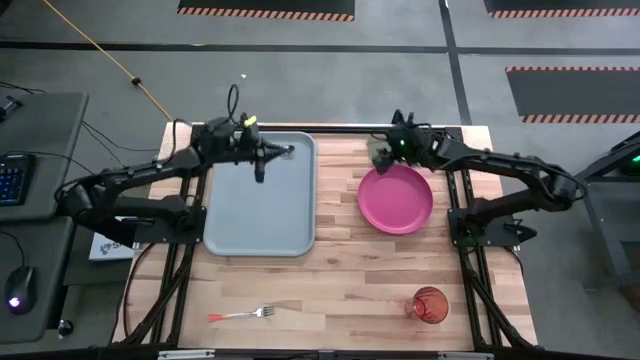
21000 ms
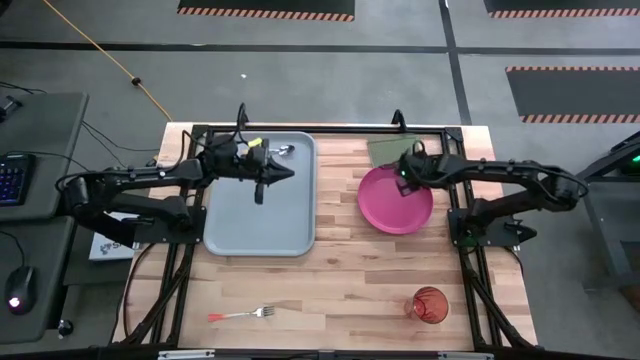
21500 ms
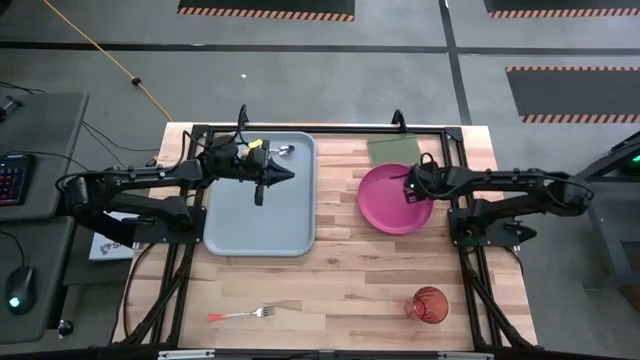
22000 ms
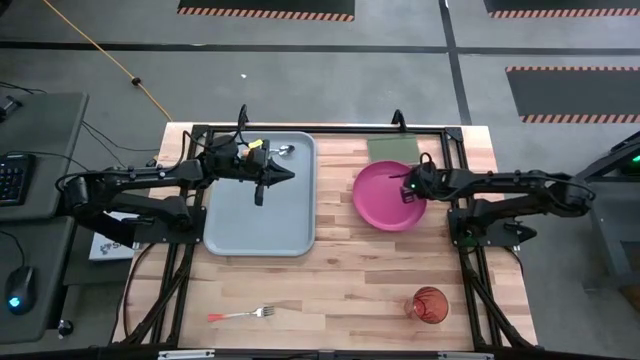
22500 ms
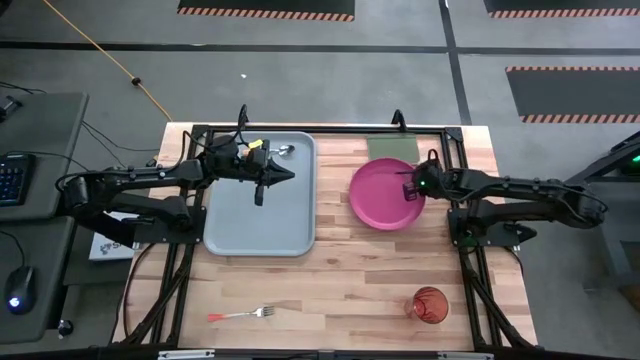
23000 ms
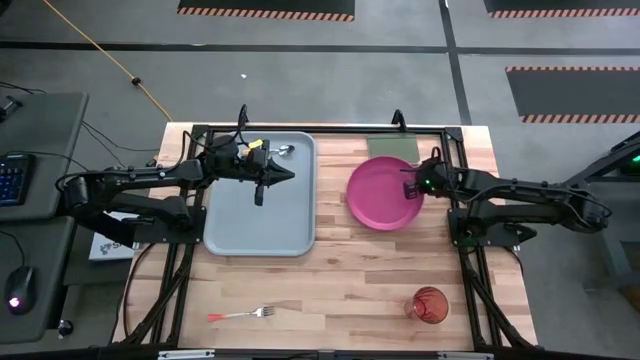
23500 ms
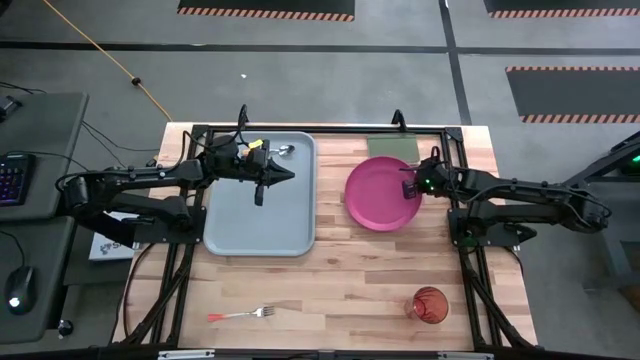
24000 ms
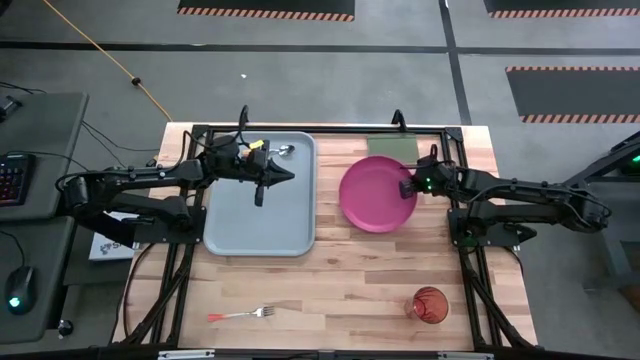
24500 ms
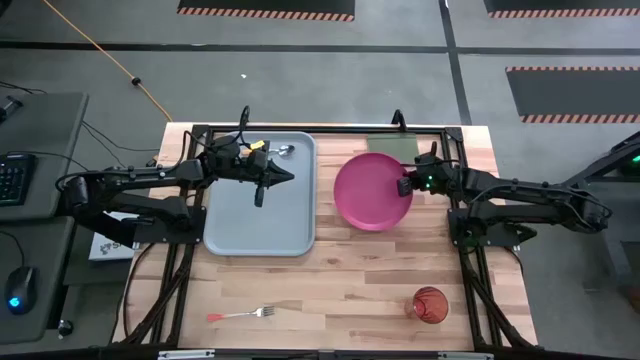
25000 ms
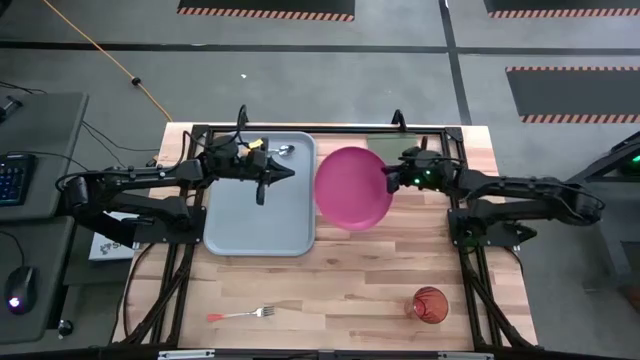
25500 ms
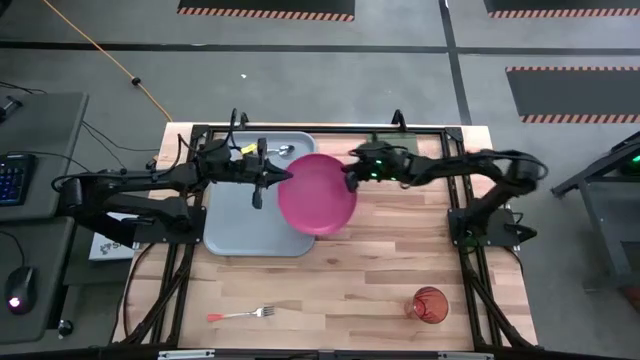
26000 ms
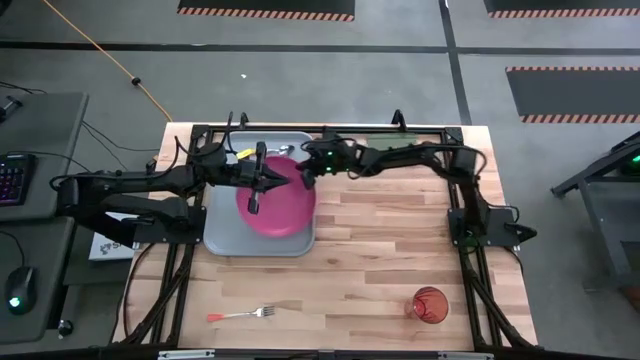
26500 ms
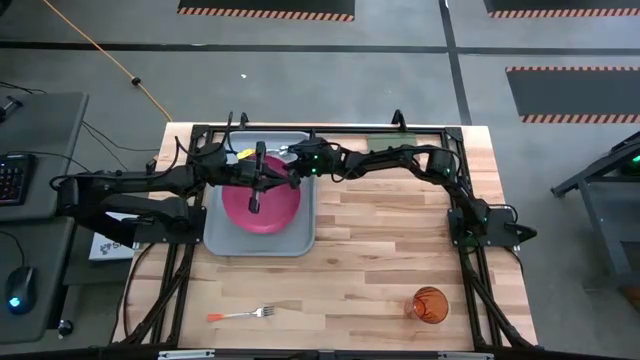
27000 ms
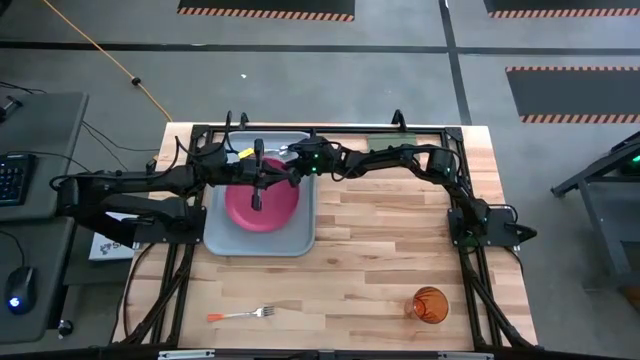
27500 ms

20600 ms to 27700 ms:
Task: Pick and place plate/cup/fork/spoon on tray
Put the pink plate on the center of the gray serving tray

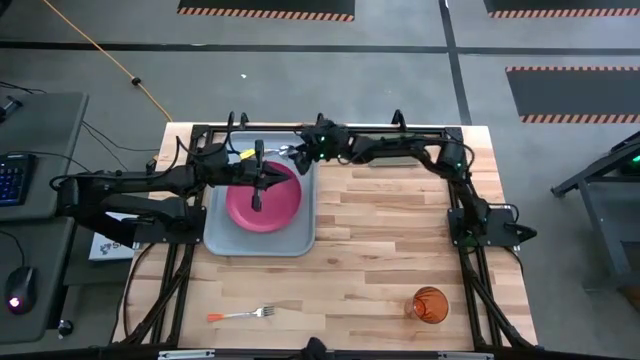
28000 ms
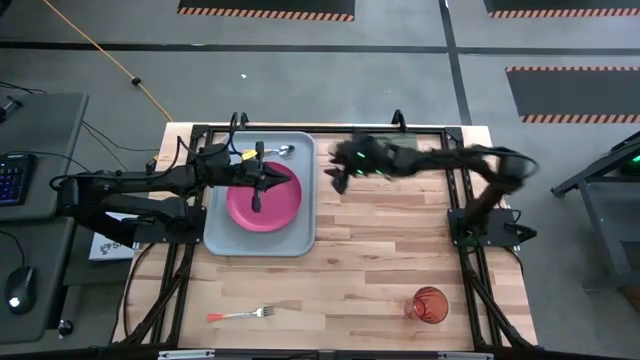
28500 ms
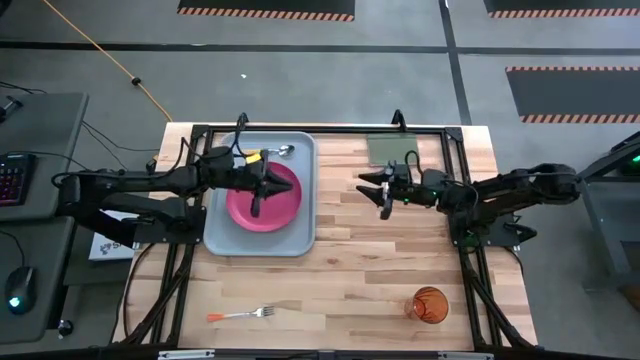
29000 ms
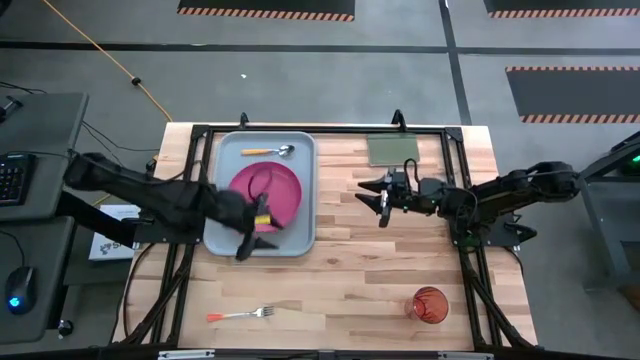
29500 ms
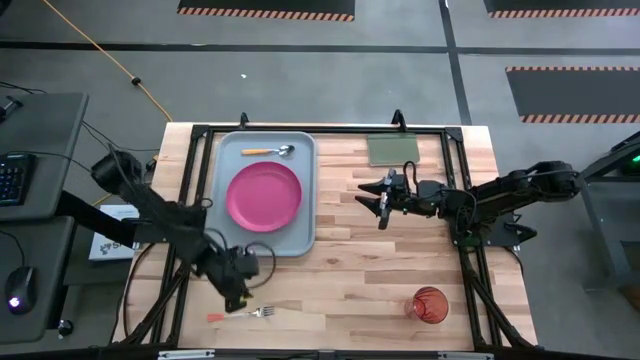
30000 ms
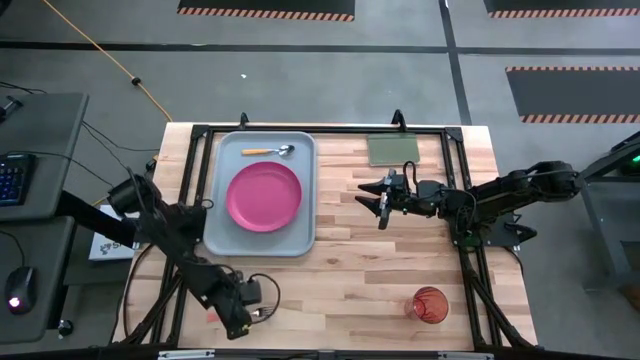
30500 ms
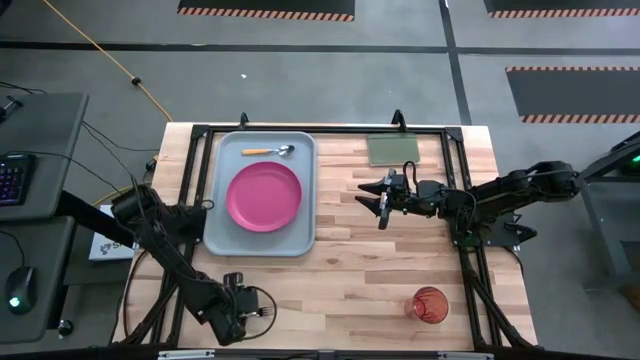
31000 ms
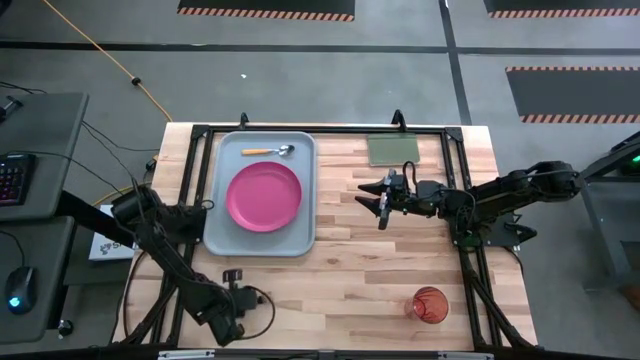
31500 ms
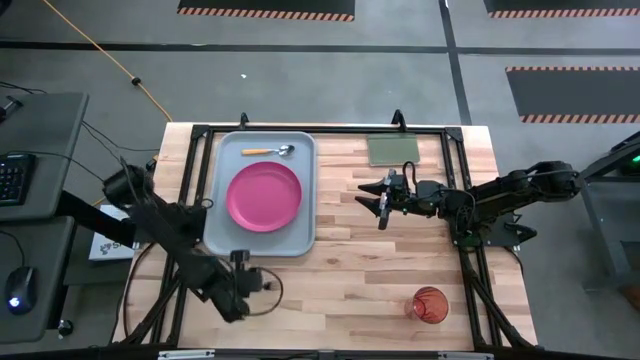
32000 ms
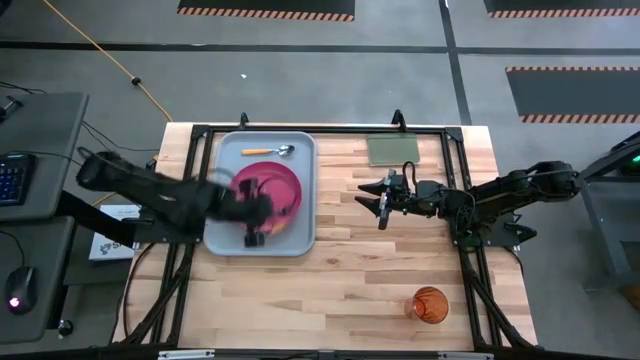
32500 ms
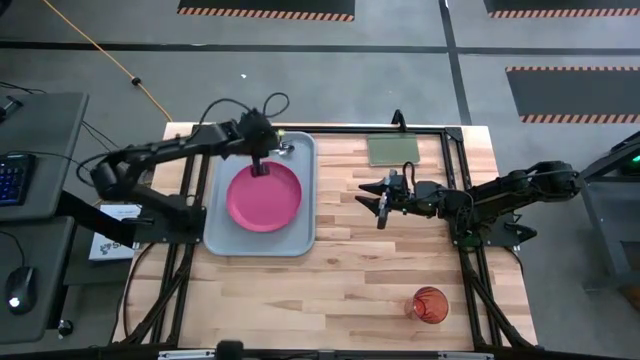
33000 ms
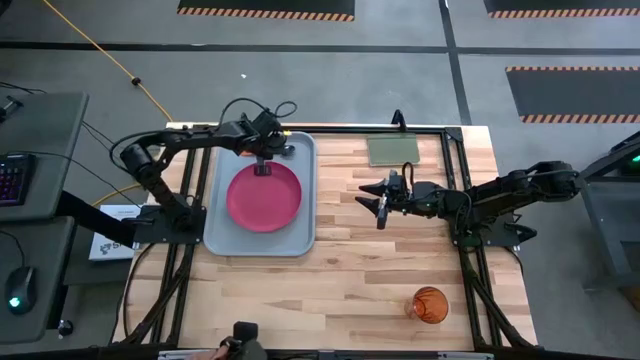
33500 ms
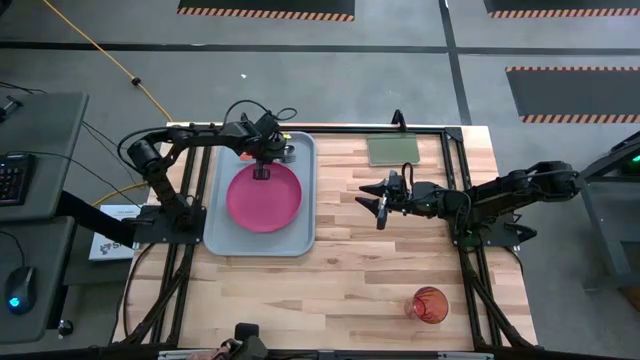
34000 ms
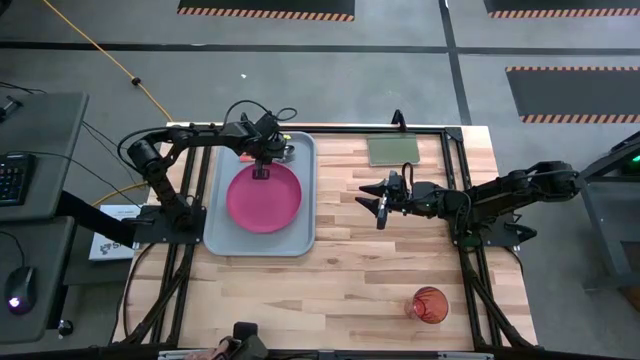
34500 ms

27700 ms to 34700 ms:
Put the orange fork on the gray serving tray to the bottom of the yellow spoon

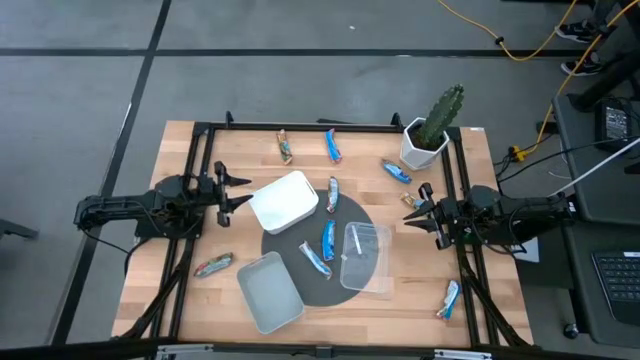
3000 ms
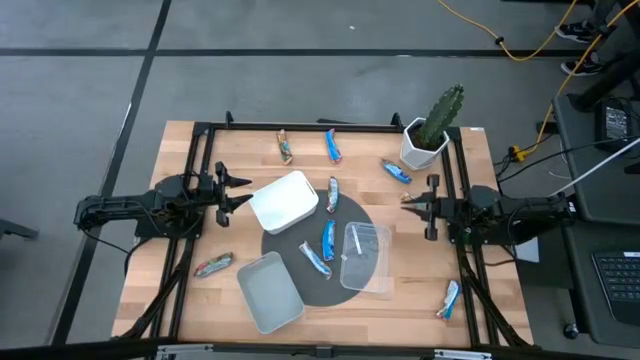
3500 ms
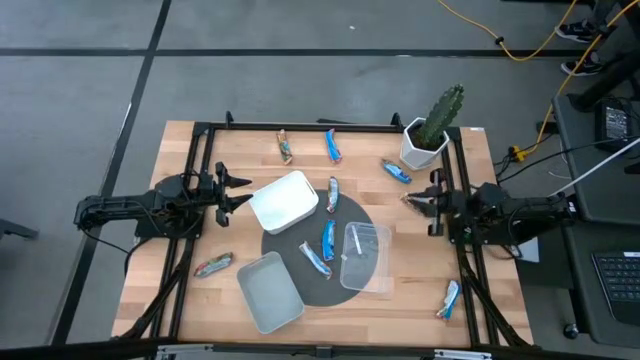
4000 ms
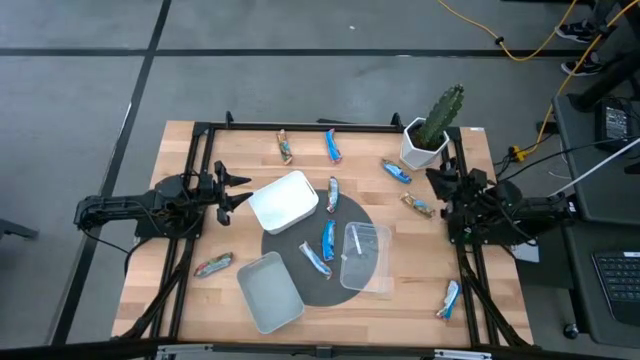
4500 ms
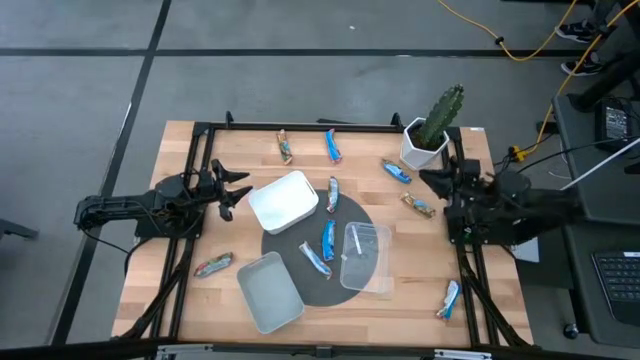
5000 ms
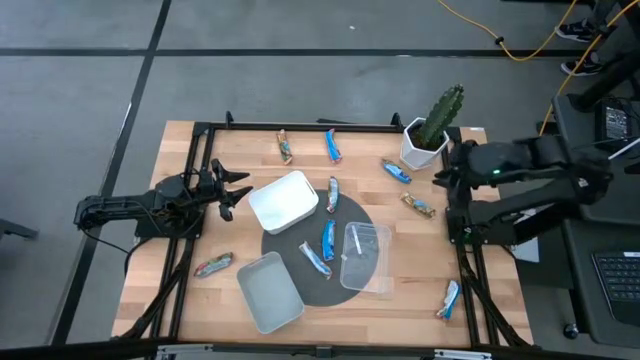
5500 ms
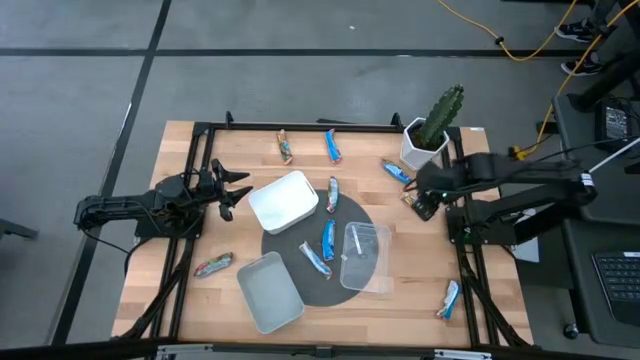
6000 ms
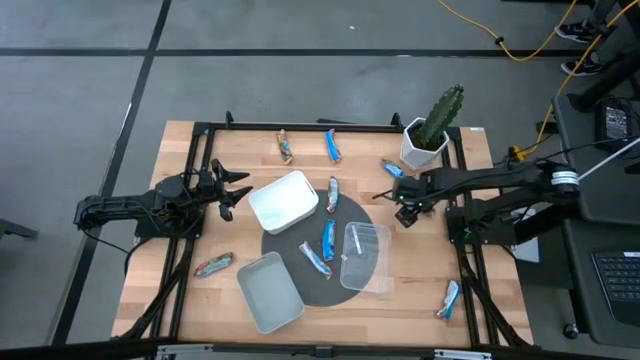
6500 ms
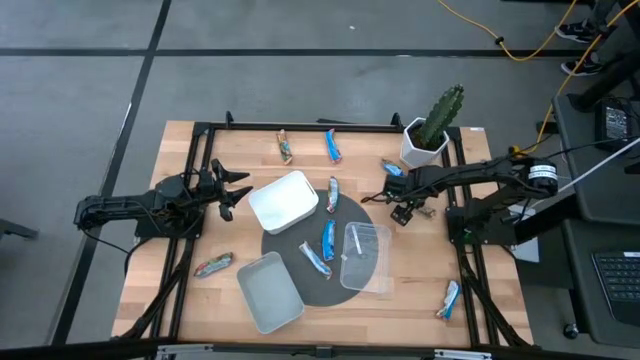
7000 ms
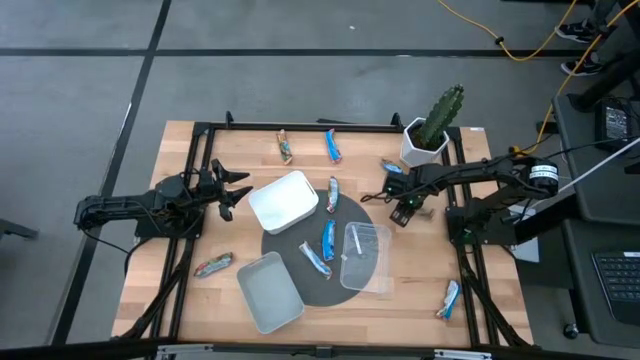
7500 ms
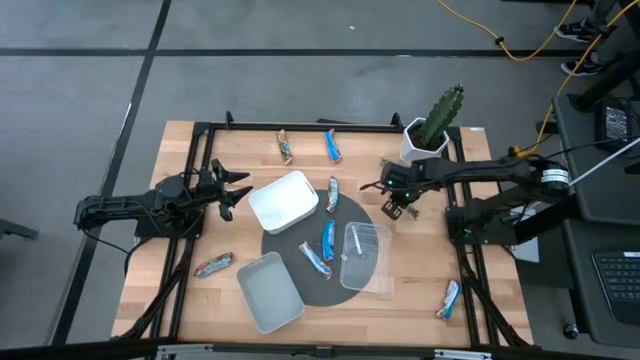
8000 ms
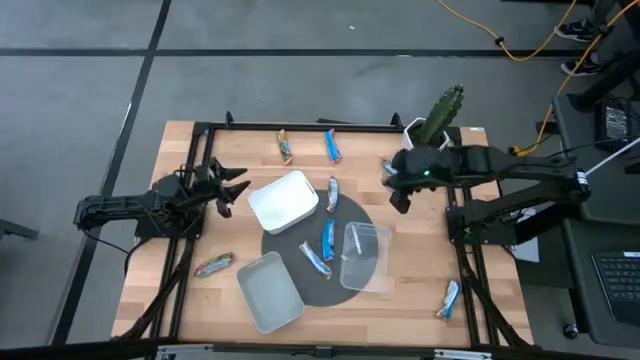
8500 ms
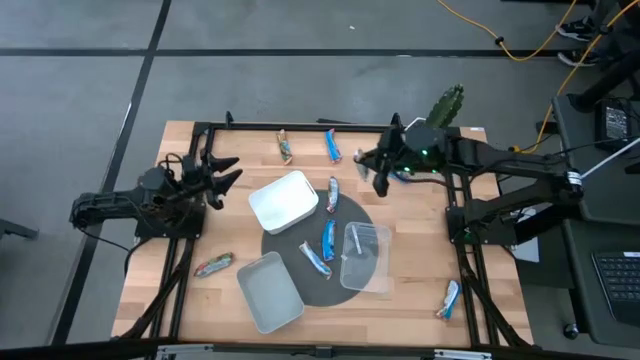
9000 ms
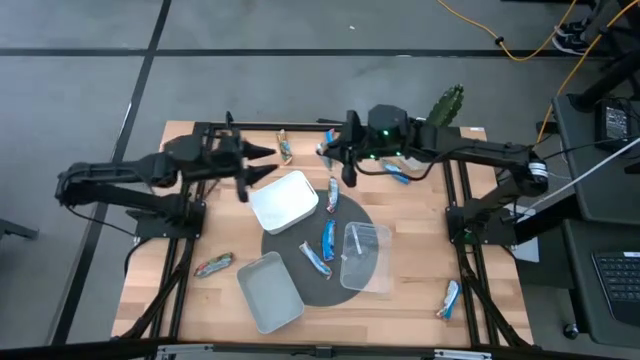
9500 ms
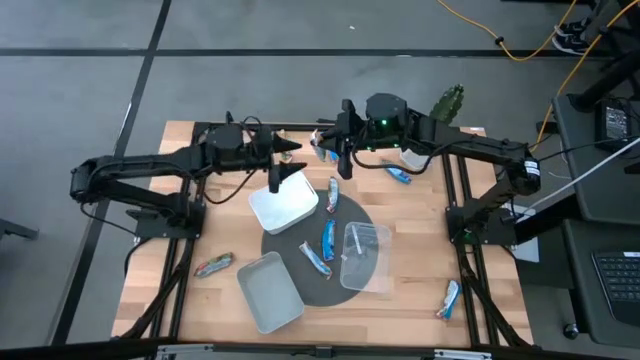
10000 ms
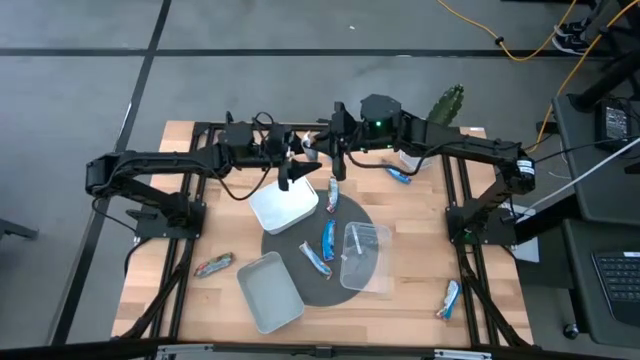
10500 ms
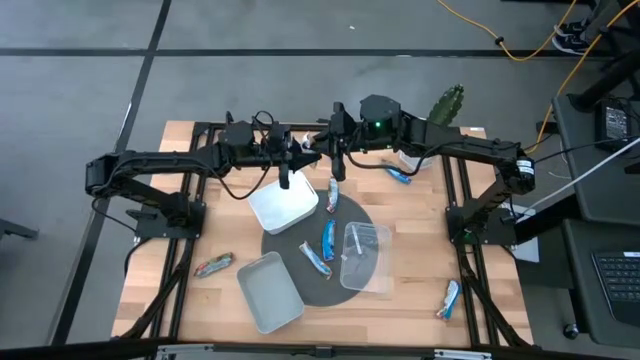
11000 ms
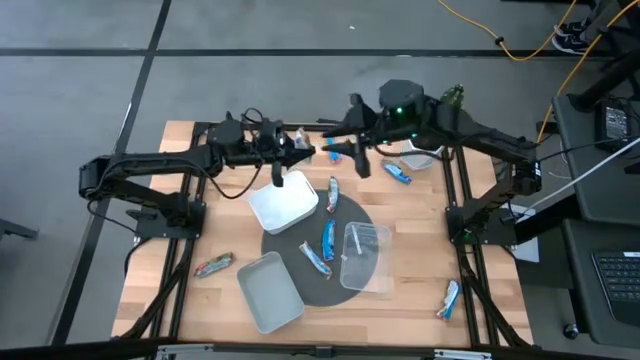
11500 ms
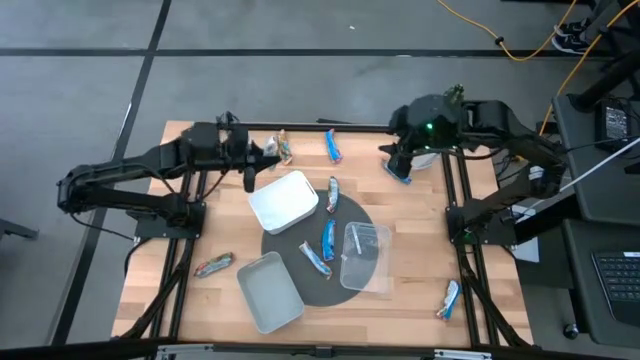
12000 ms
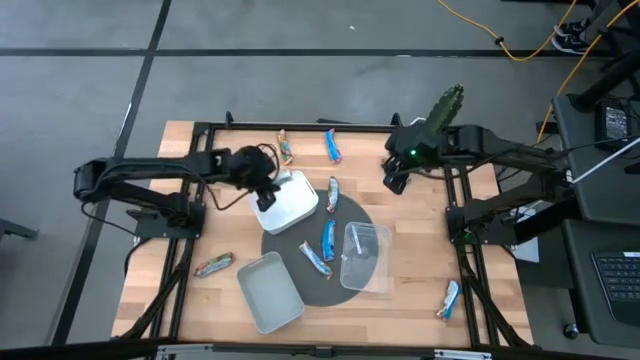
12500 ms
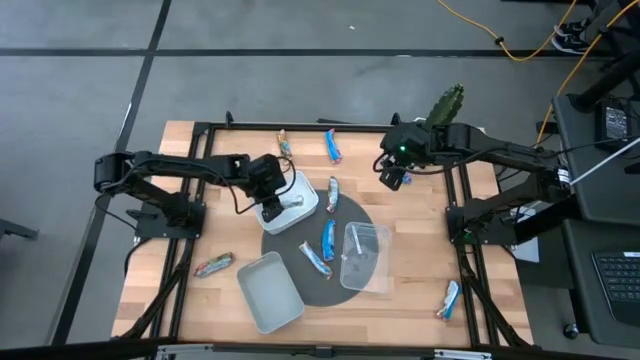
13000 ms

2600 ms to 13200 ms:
Task: Pick and place Granola Bars by type
Put the orange granola bar into the white bin
